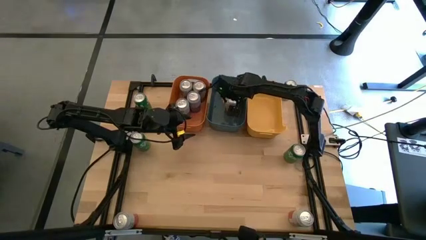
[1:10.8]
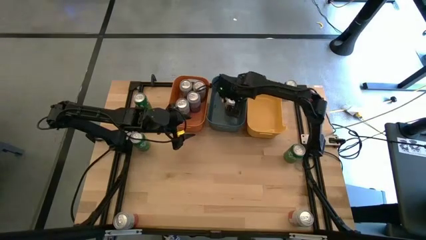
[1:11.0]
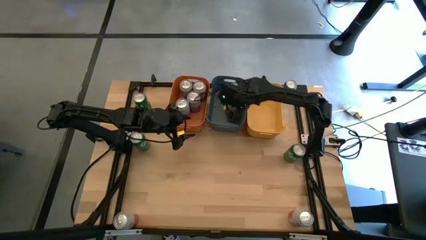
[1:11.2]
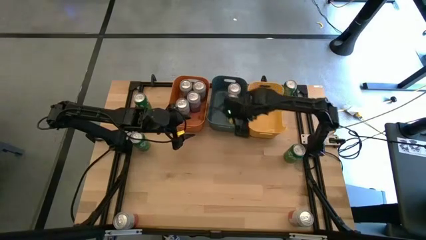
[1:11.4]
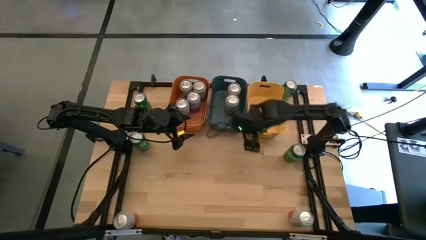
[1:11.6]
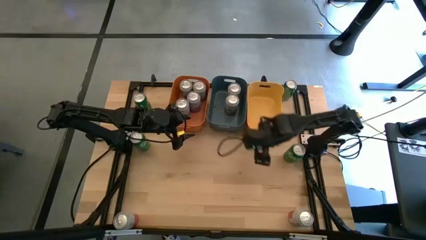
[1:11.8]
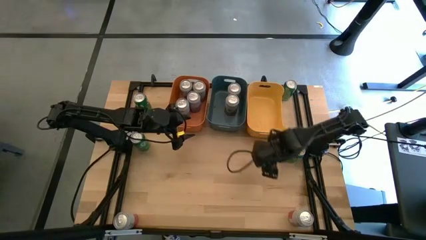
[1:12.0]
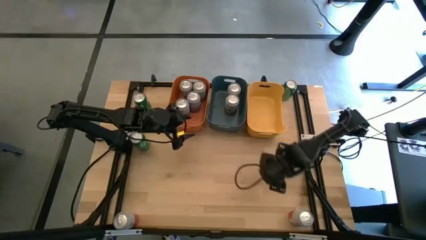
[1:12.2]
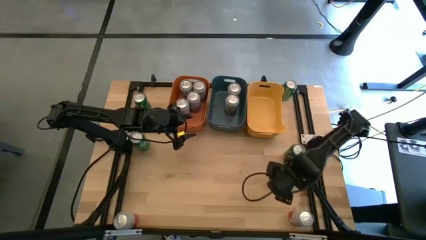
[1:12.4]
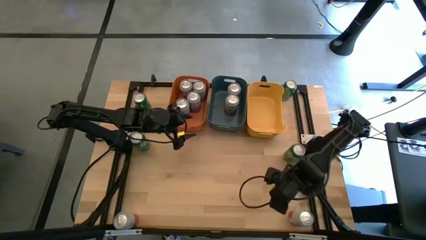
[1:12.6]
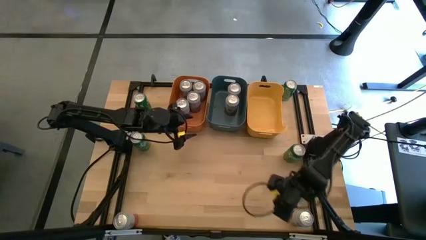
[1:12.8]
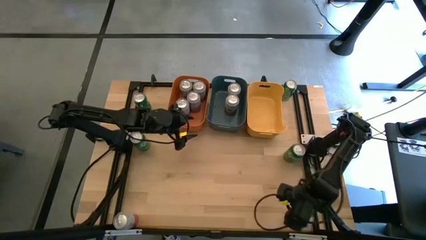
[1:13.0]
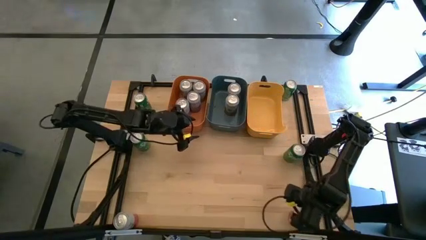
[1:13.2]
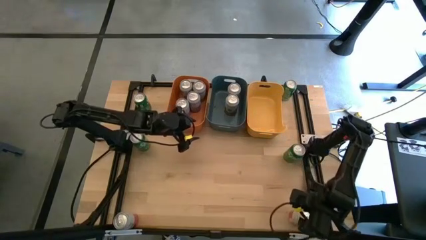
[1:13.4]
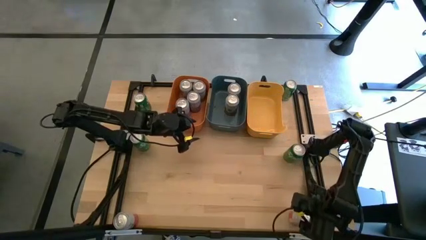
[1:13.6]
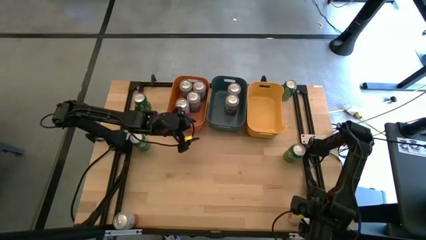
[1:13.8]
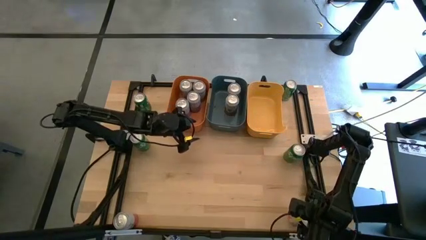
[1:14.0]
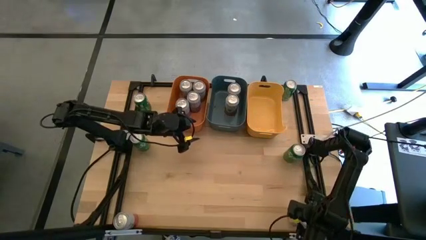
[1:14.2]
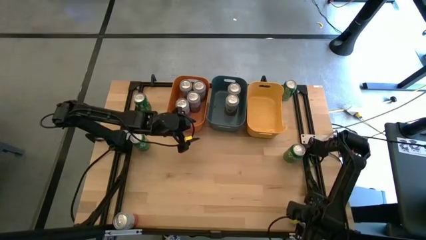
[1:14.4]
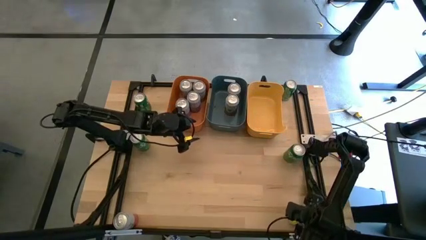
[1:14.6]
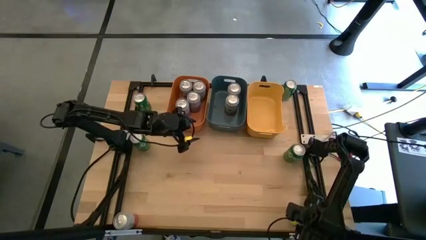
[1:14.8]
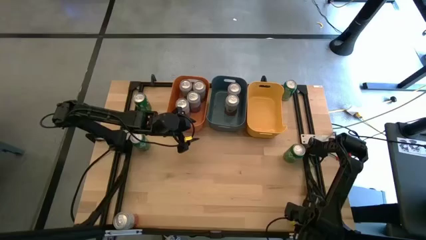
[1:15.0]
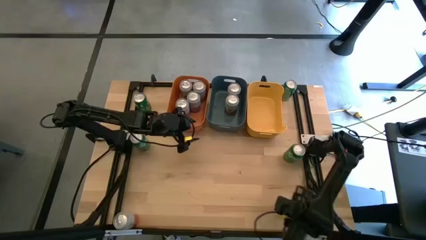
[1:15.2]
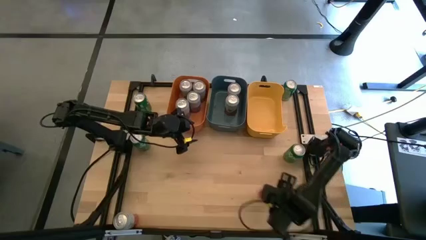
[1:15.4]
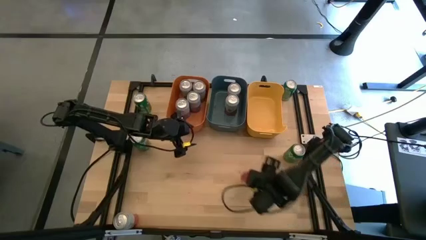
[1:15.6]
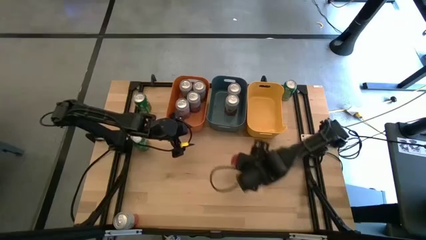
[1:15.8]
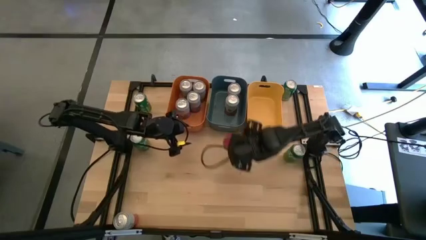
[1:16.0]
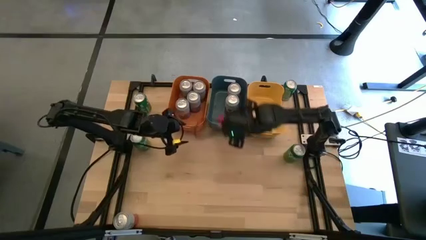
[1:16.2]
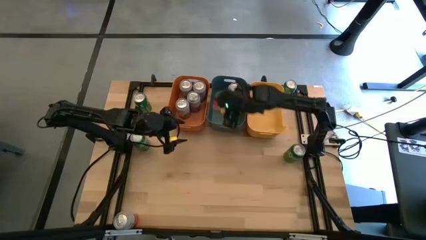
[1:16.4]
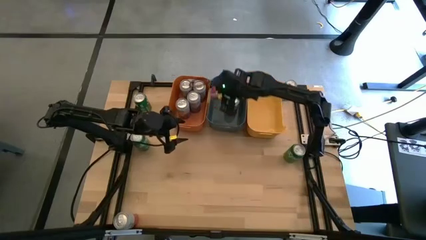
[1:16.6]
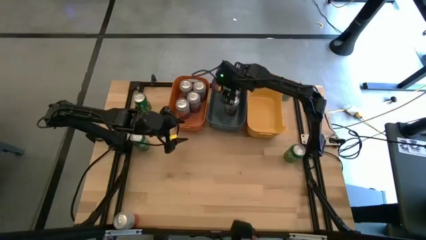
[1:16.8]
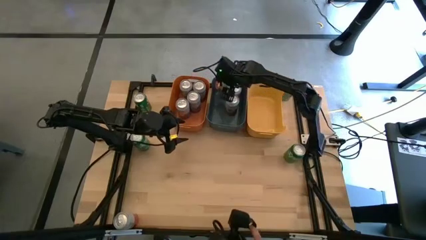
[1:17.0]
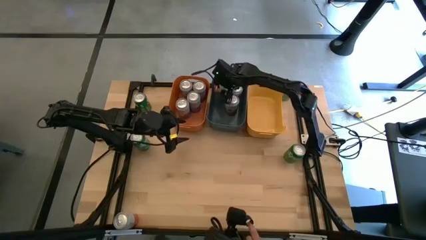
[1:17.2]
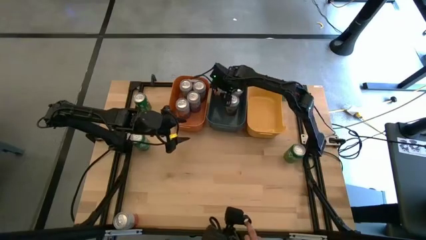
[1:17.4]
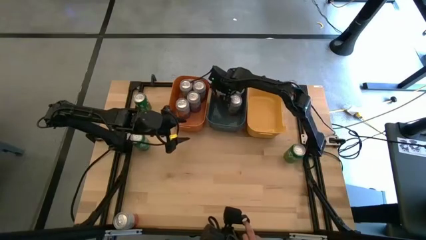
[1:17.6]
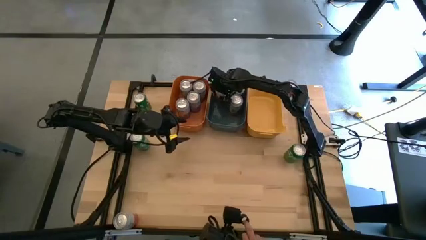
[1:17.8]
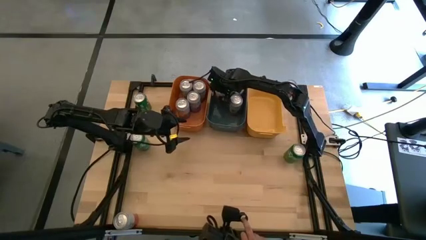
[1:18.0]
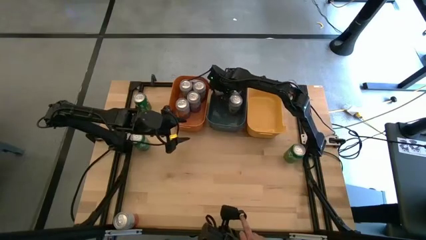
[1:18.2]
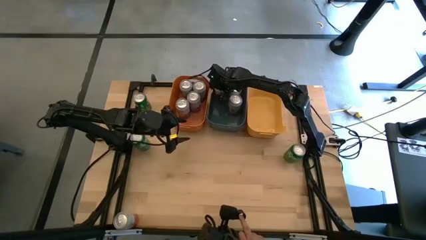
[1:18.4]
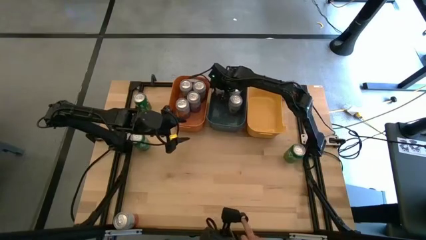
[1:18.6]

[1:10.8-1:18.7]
Task: Sort soda cans
Put the right pink-white soda can into the blue bin

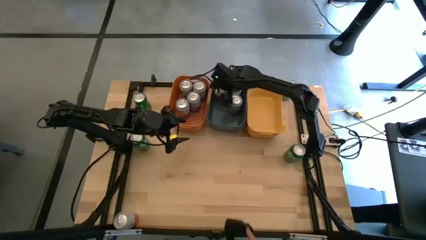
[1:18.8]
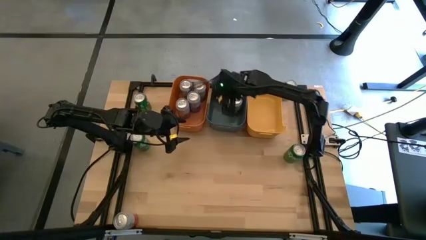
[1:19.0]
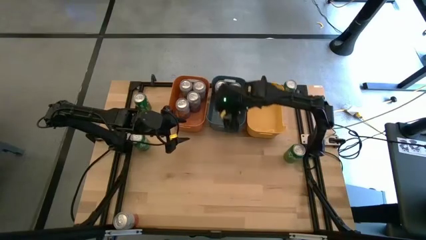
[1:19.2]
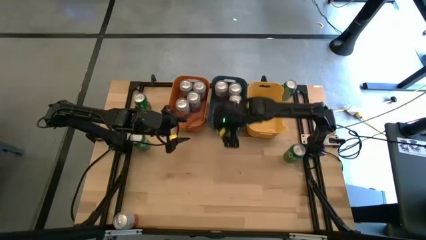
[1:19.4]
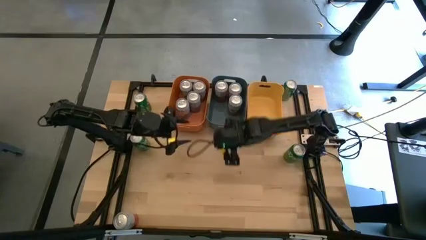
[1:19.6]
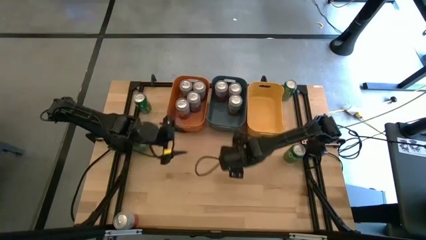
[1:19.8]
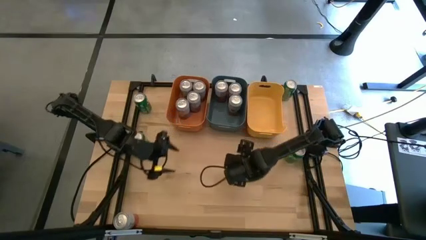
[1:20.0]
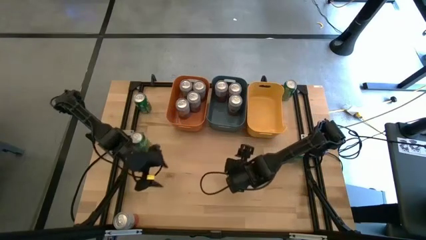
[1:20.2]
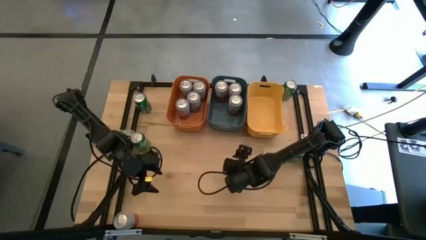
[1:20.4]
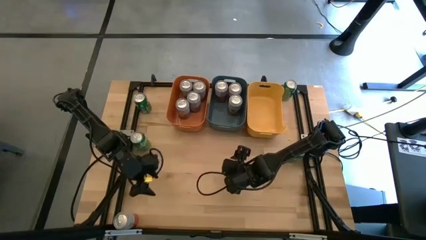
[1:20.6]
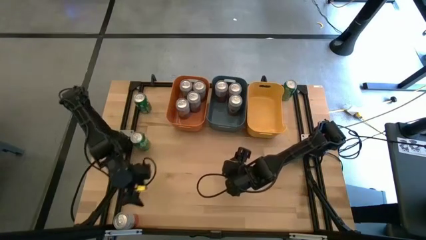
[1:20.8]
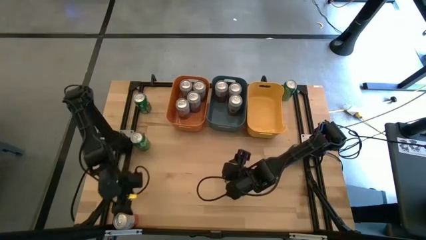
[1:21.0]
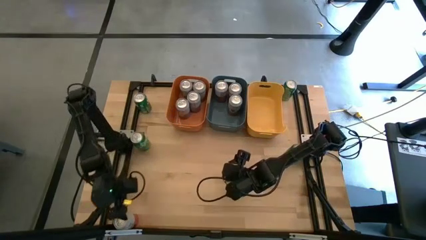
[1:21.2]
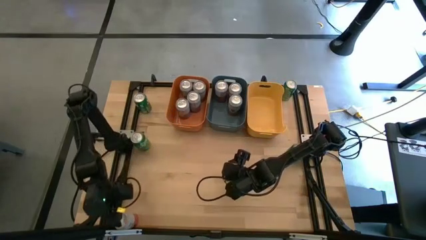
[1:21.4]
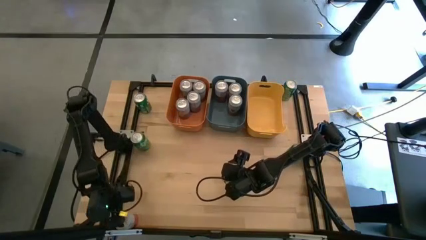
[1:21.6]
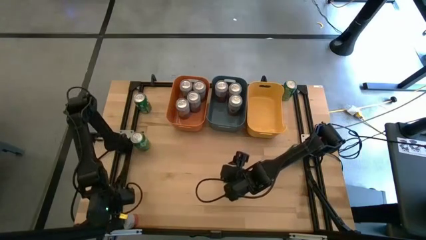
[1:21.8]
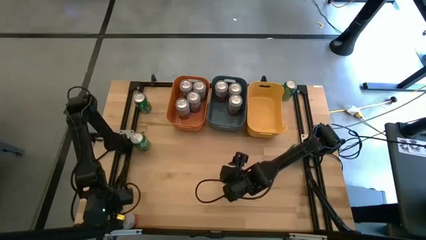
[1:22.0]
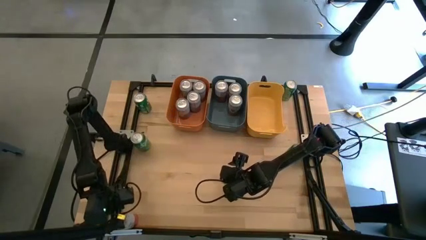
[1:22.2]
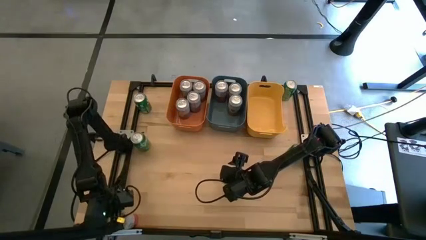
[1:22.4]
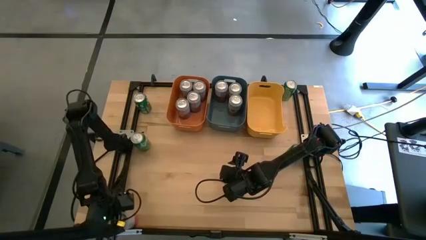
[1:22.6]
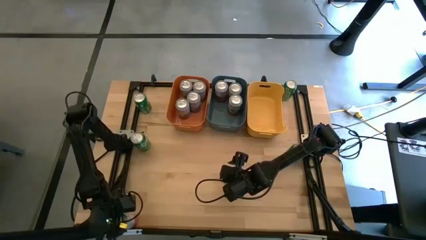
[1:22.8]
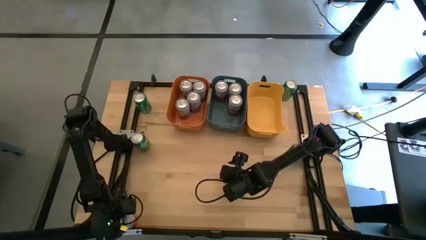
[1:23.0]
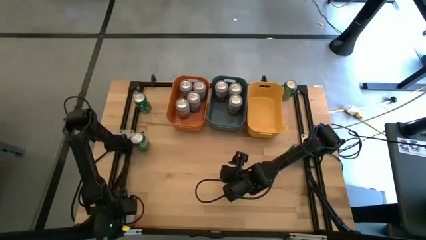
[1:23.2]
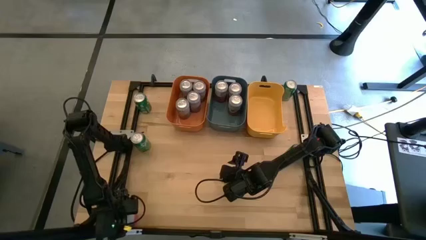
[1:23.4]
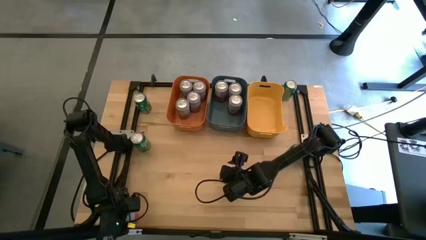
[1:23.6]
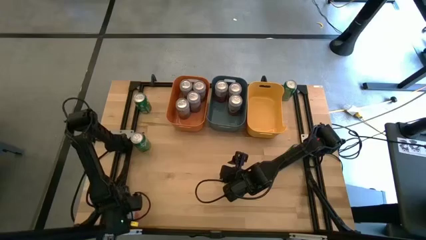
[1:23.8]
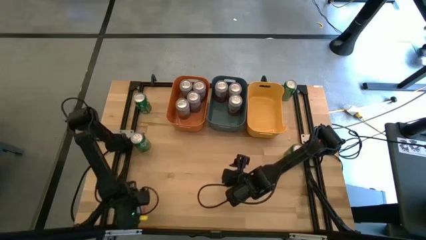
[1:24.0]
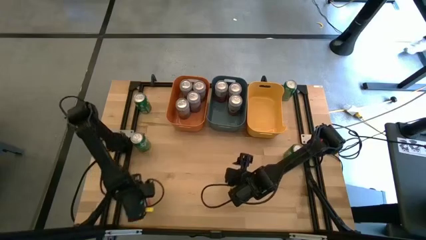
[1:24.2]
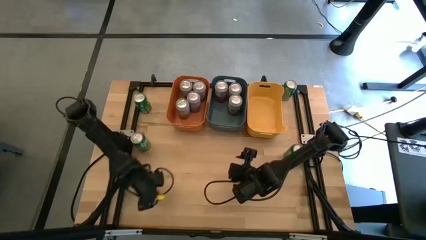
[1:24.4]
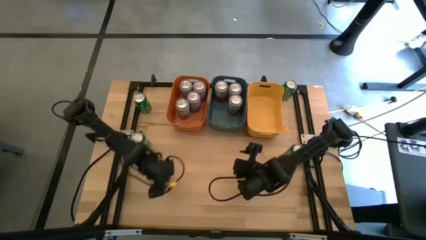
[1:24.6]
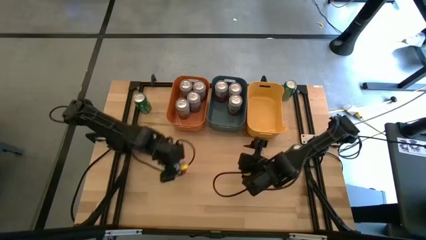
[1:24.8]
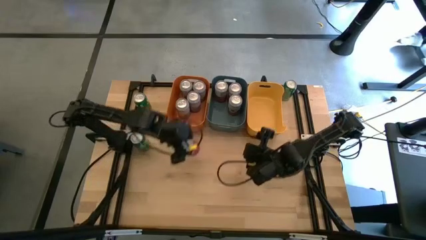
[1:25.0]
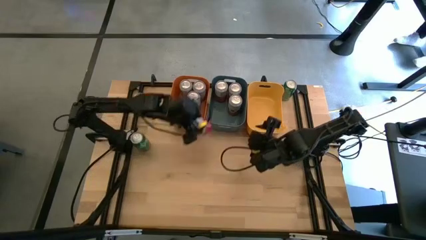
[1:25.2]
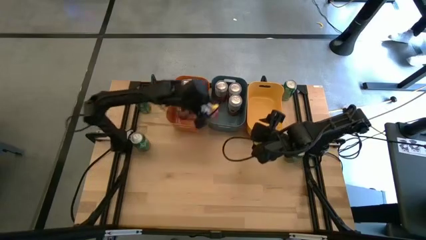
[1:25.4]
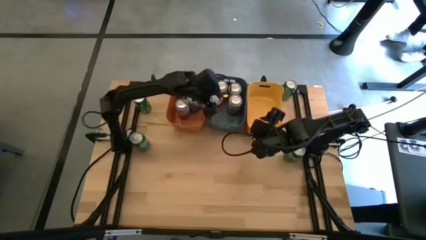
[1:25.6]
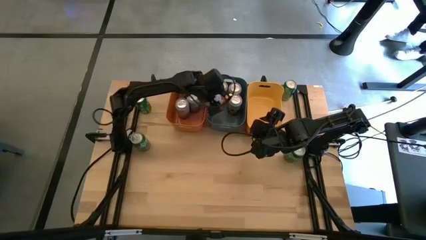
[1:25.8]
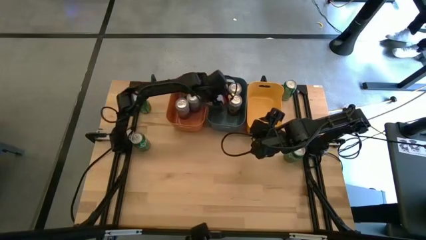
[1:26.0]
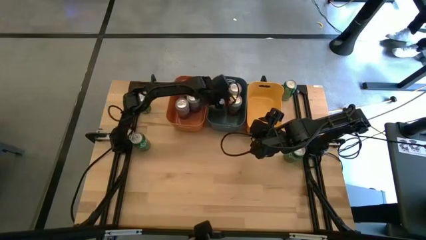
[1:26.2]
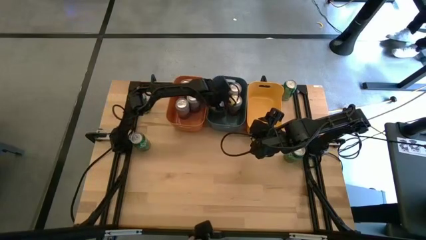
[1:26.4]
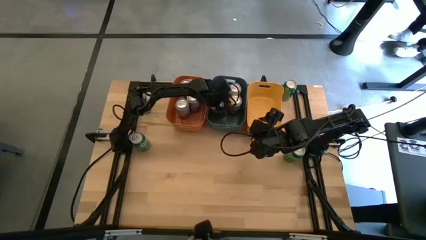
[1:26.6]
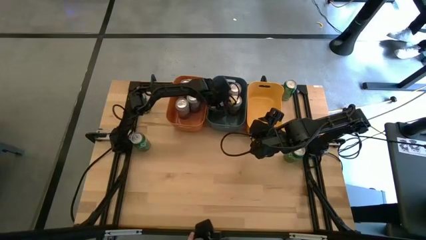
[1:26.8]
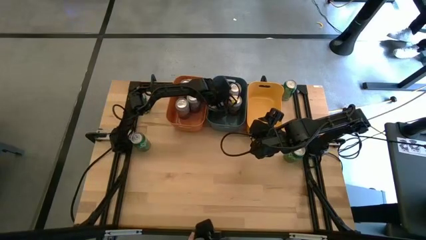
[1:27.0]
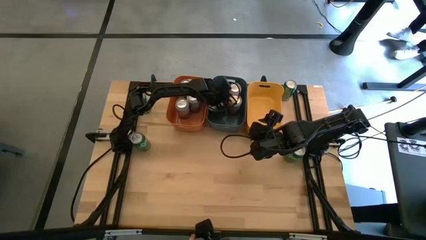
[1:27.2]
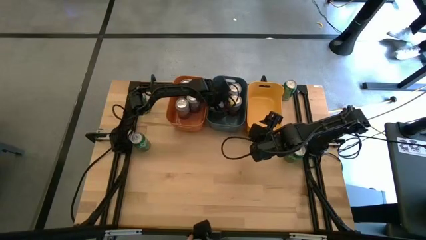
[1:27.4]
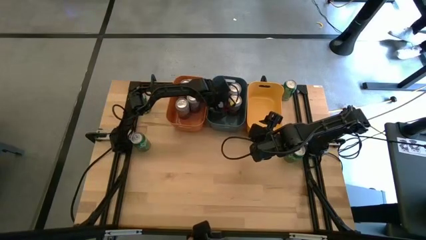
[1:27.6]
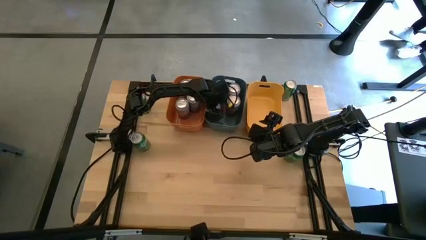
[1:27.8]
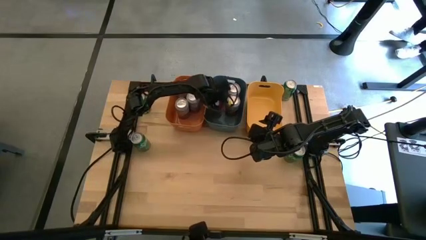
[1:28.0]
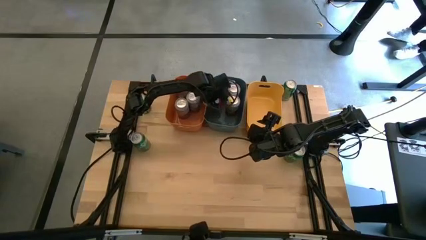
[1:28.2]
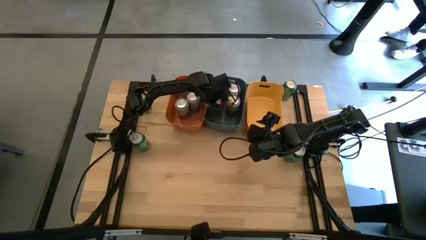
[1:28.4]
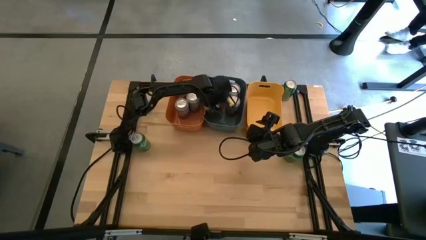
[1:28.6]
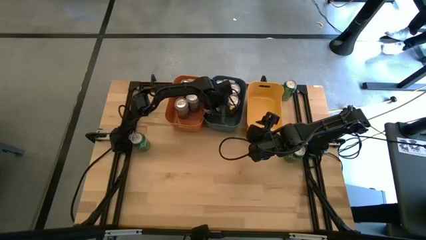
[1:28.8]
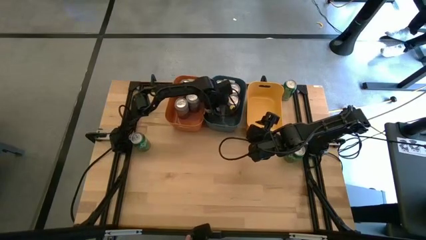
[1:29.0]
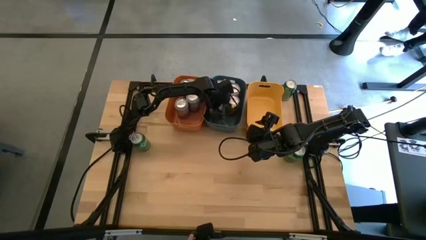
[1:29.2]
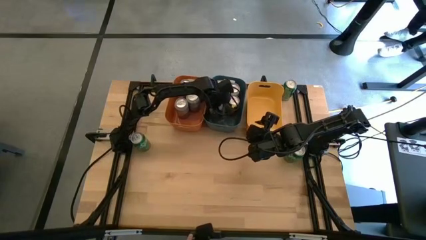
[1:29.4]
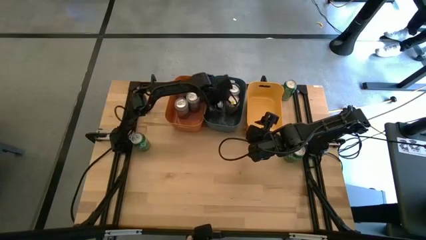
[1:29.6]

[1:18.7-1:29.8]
Put the pink-white soda can into the blue bin
